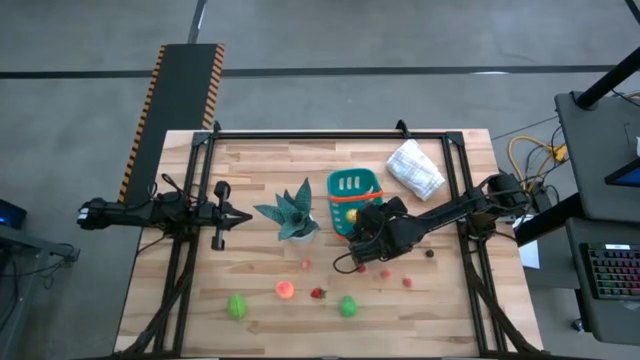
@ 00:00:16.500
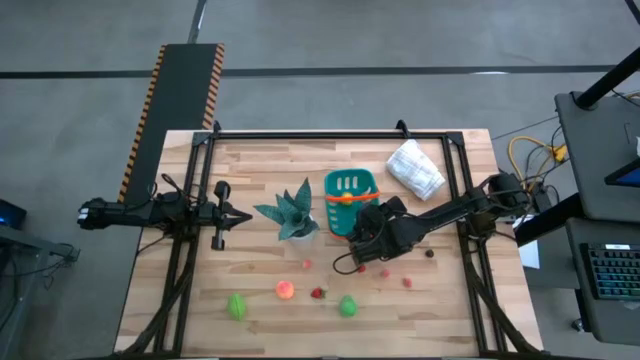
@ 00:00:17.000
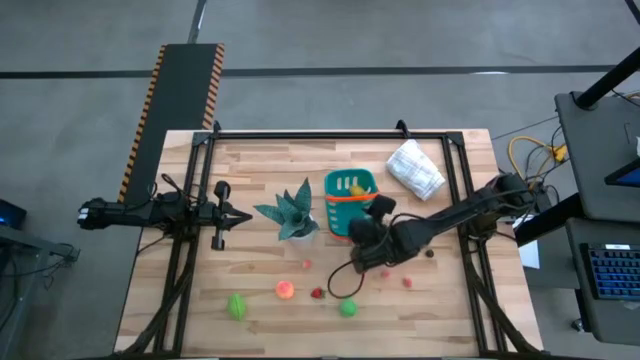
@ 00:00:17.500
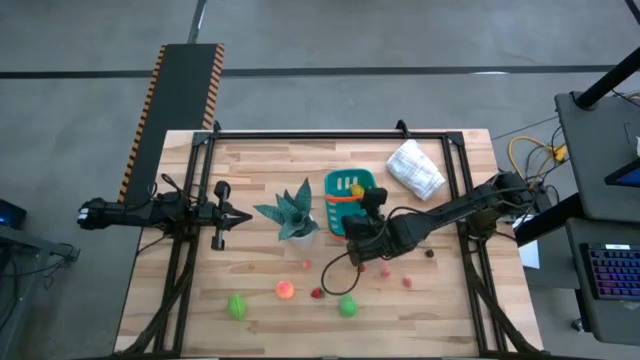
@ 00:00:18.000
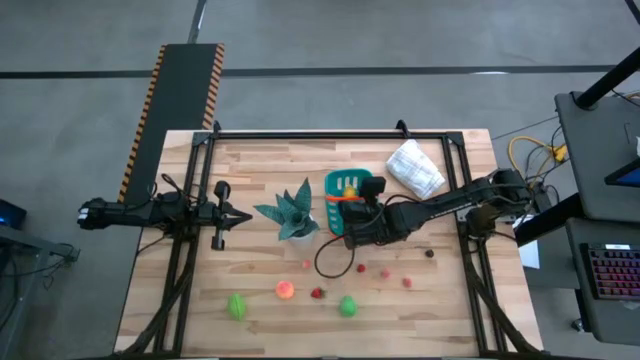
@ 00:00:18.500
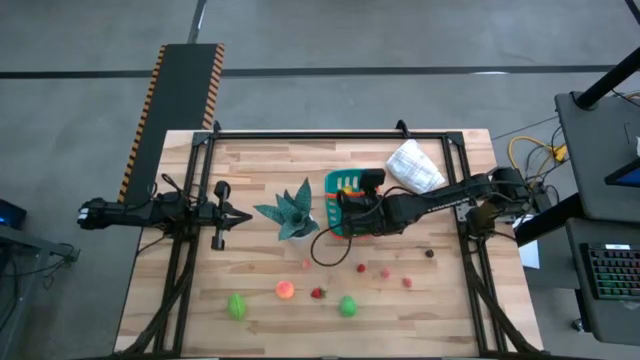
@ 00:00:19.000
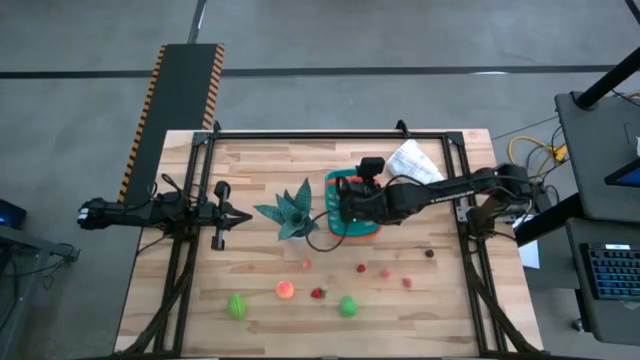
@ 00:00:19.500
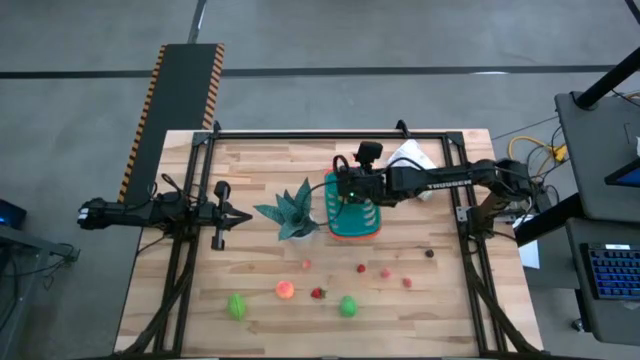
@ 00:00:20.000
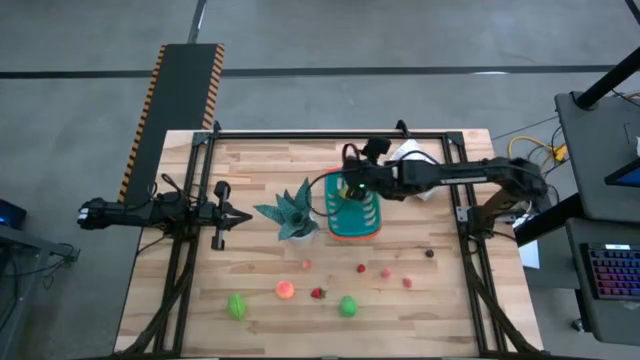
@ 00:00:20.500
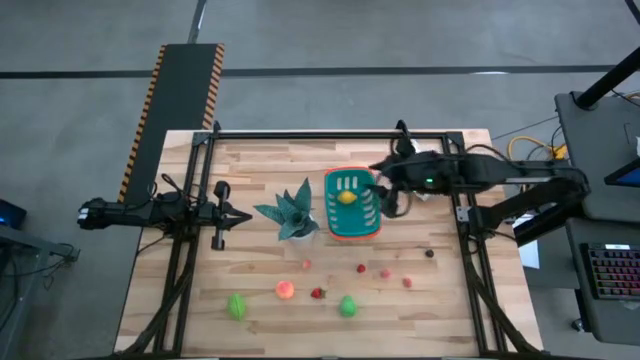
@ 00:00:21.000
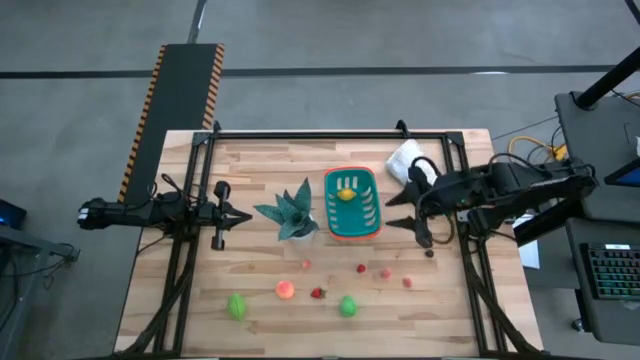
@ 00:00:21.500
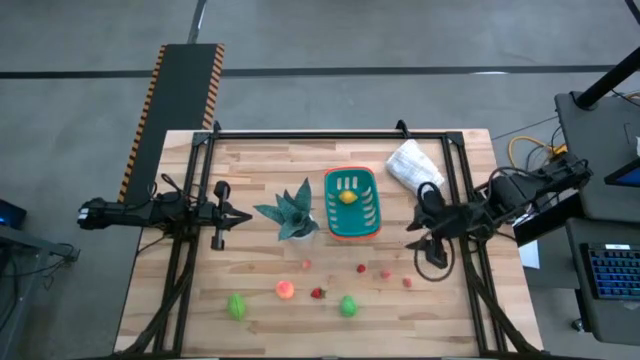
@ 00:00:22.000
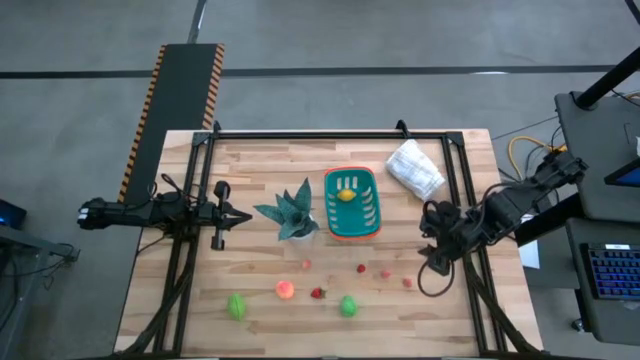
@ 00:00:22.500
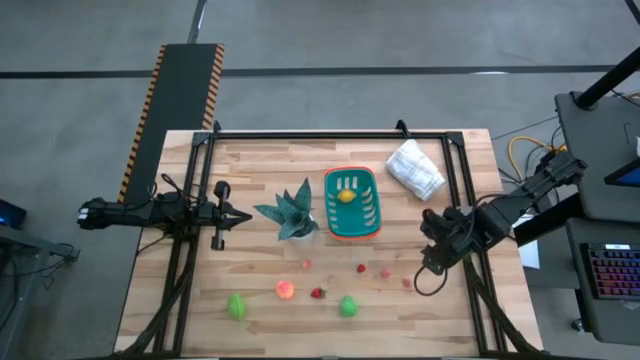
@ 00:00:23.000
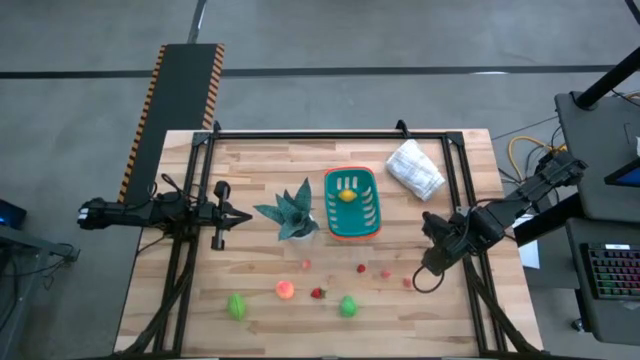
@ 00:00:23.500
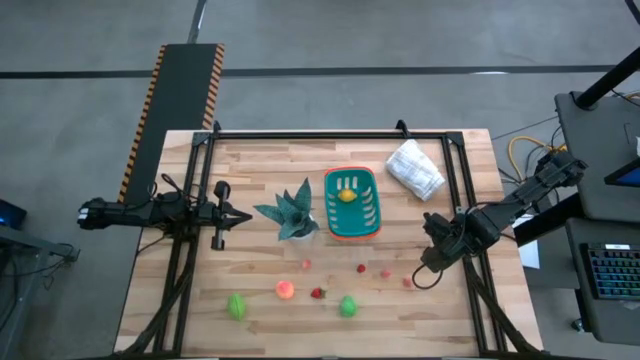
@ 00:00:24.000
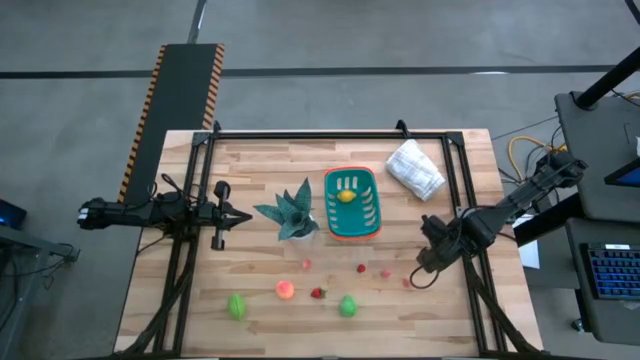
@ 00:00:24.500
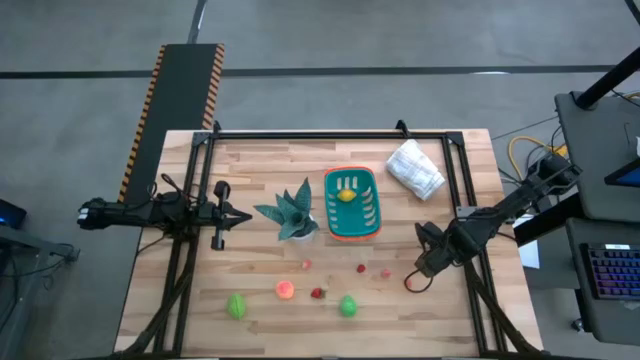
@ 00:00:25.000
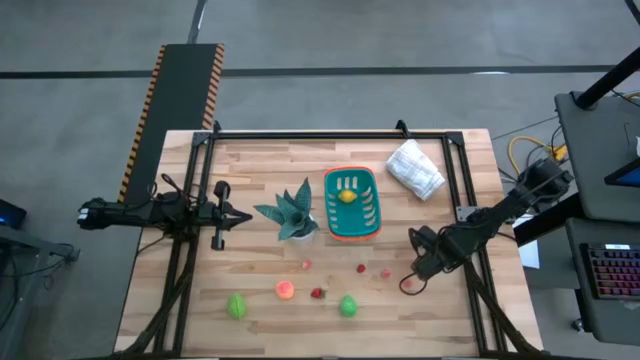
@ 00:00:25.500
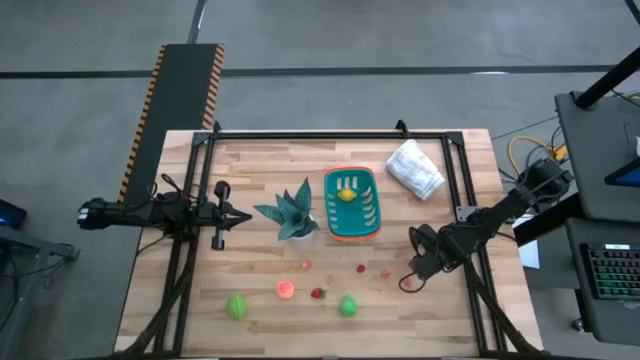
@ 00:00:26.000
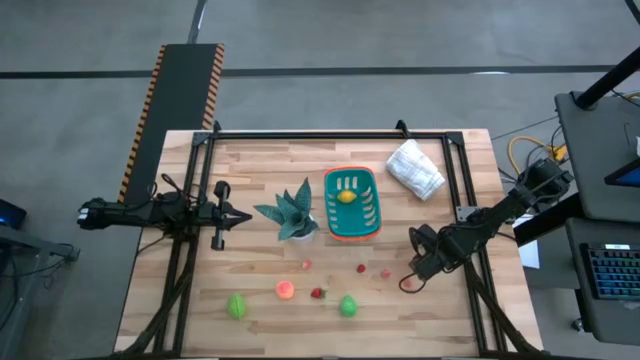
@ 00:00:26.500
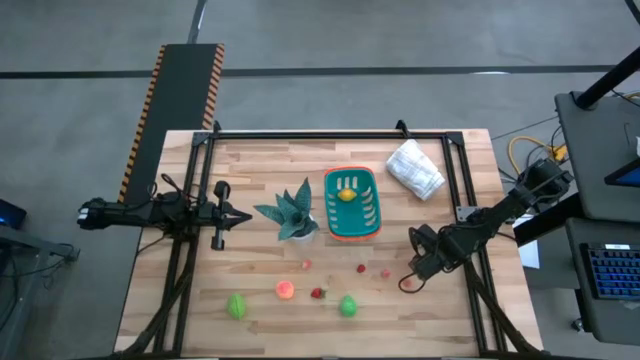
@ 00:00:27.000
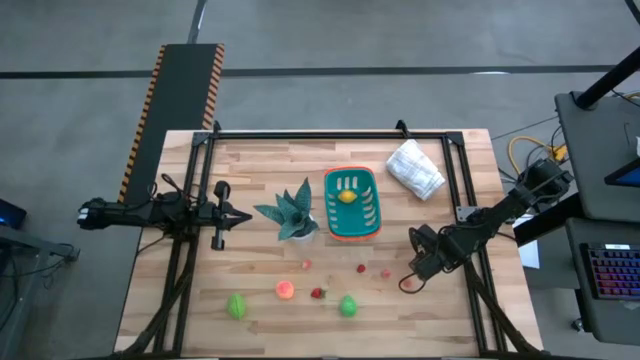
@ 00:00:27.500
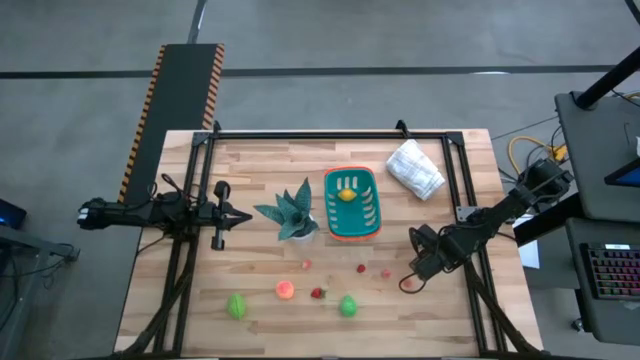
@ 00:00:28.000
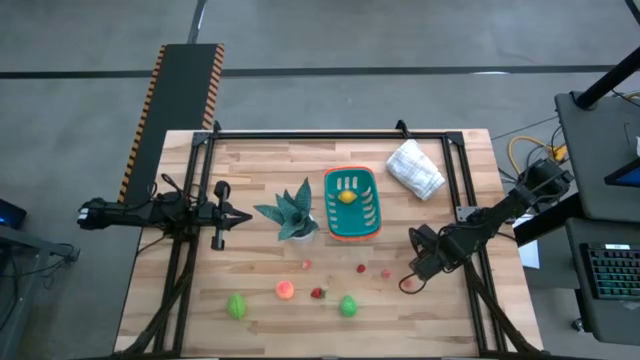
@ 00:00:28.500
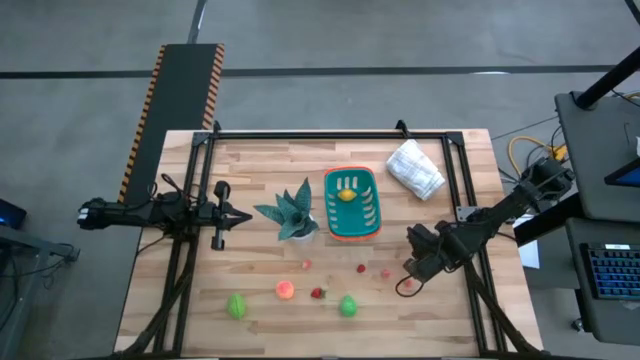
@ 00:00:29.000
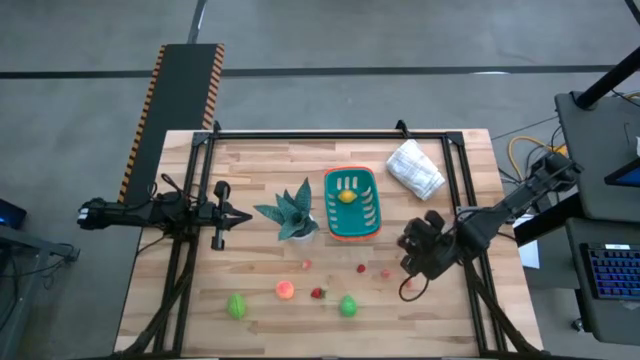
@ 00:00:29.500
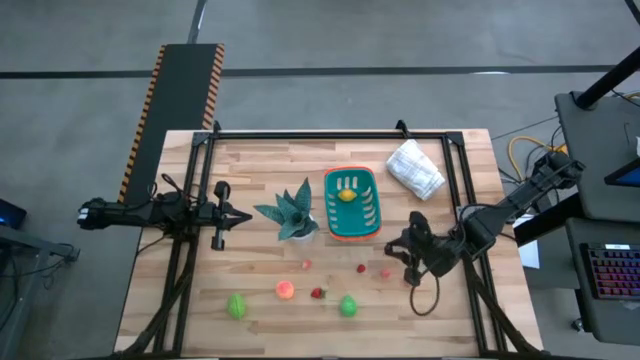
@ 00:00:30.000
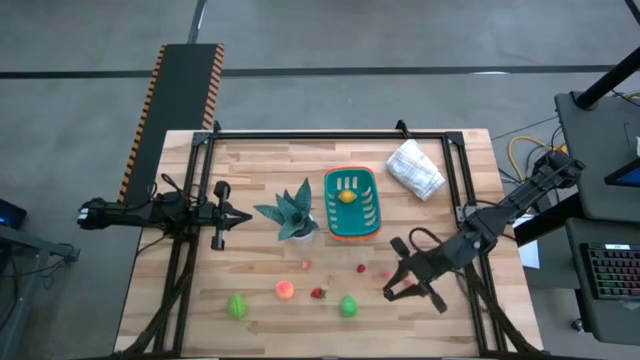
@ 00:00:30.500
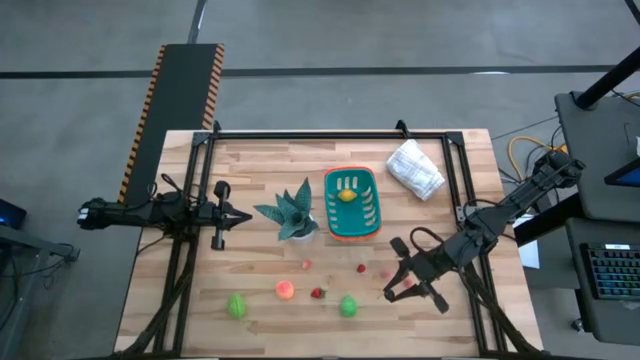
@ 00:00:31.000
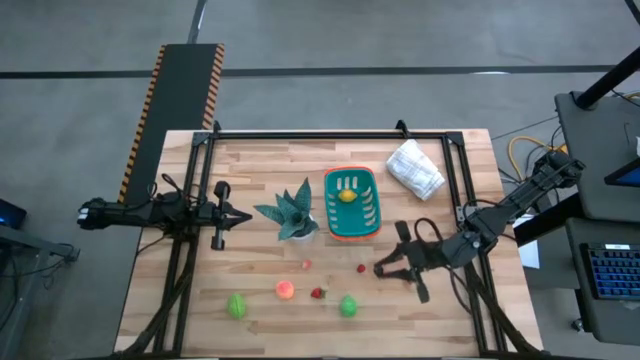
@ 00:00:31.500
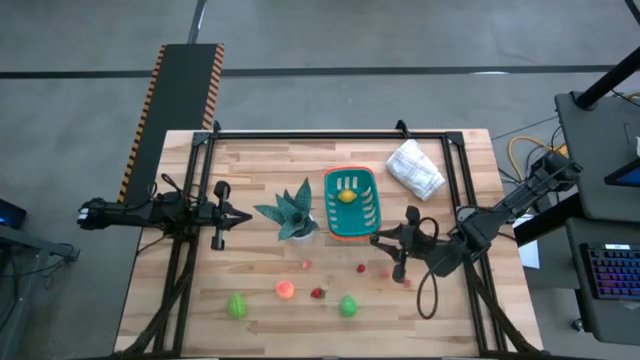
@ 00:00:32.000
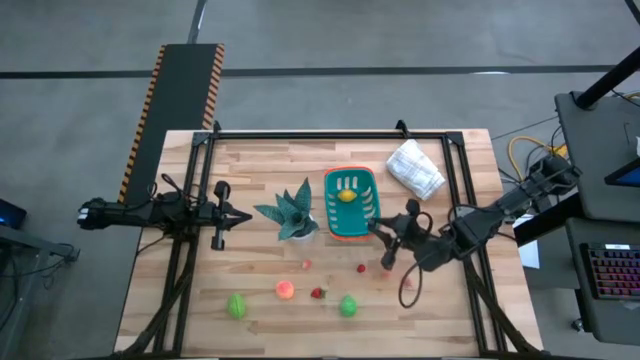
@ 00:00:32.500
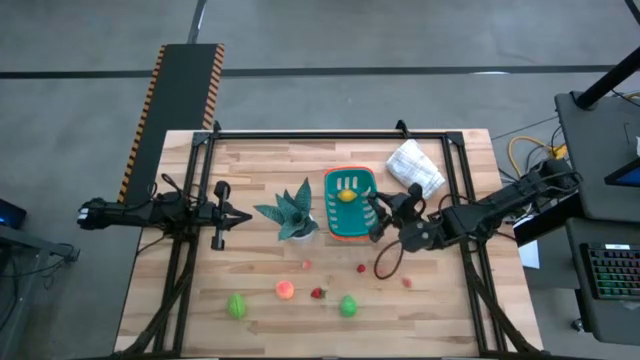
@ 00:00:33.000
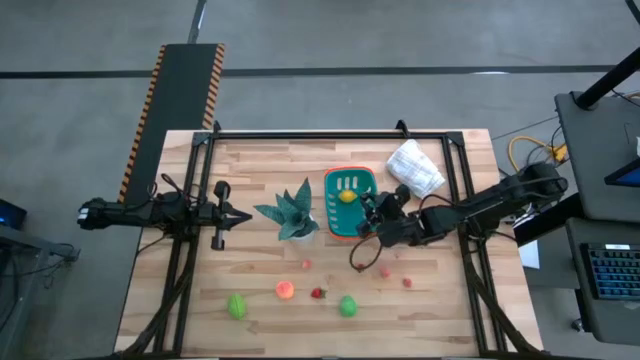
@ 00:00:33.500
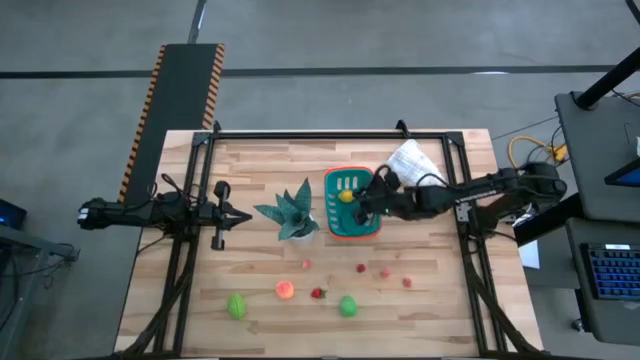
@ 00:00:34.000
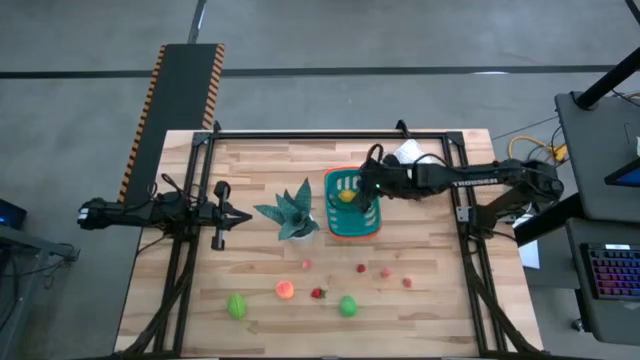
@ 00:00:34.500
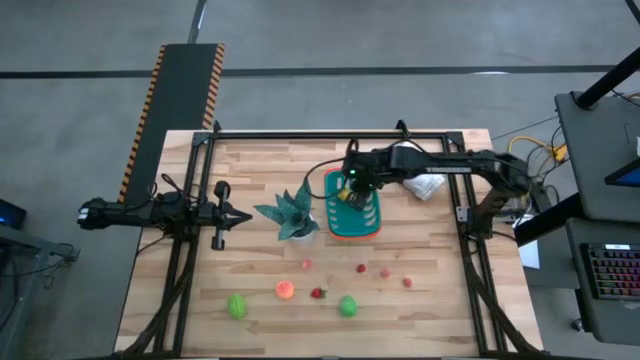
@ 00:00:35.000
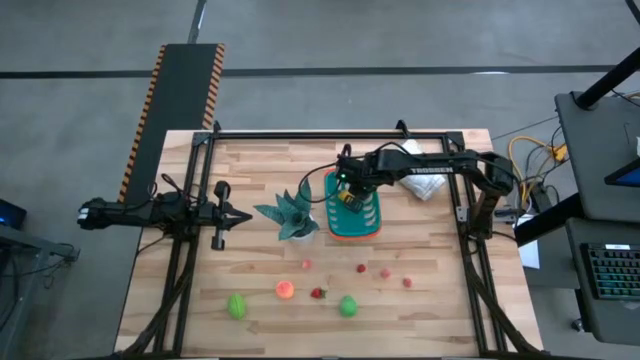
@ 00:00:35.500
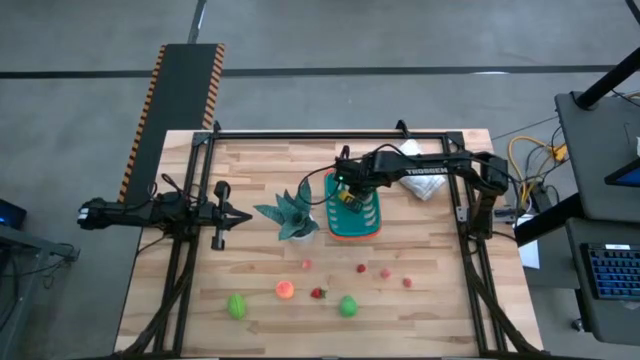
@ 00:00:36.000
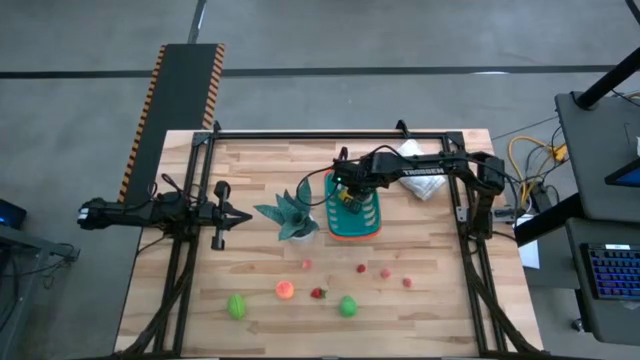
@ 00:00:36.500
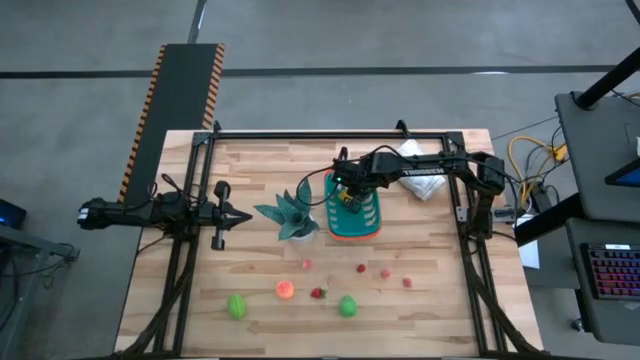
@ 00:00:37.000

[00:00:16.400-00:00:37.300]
Task: Build produce basket
Put the cherry into the basket
